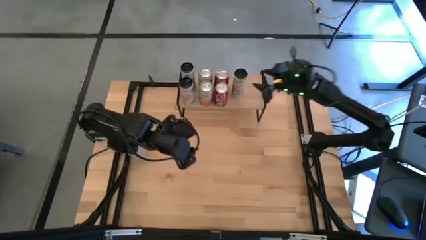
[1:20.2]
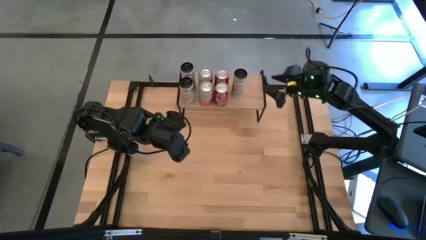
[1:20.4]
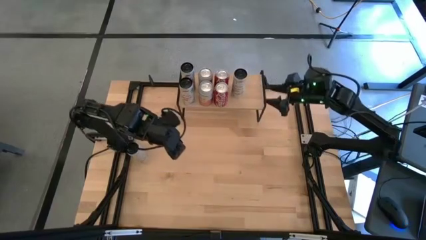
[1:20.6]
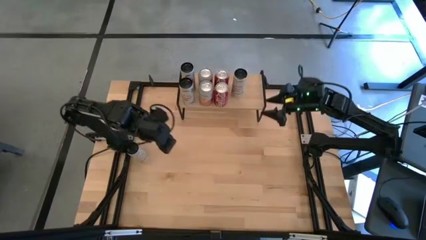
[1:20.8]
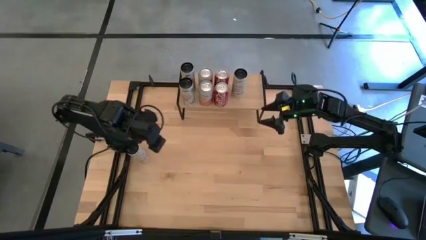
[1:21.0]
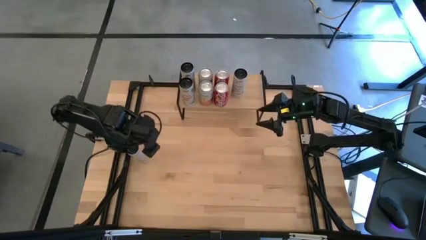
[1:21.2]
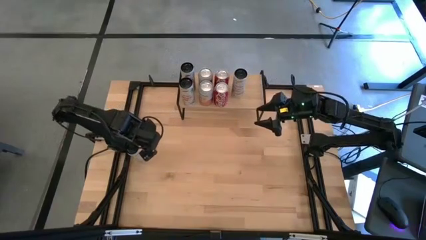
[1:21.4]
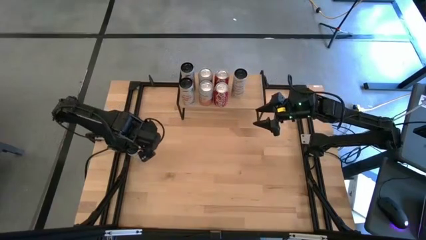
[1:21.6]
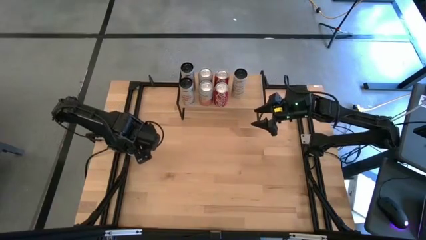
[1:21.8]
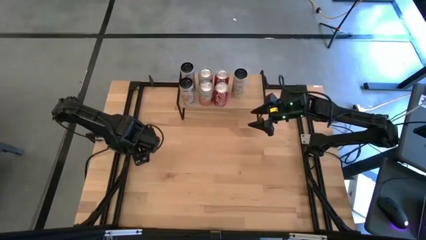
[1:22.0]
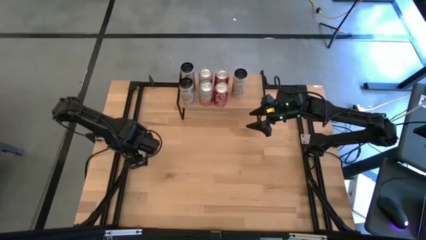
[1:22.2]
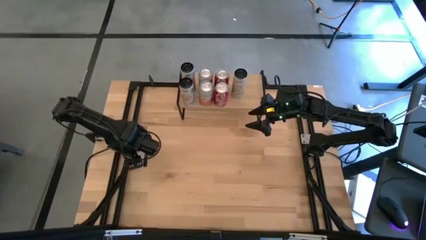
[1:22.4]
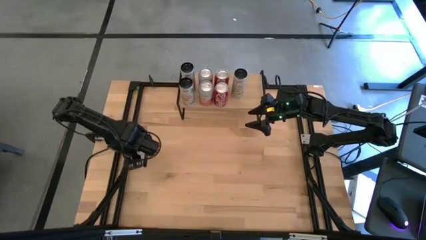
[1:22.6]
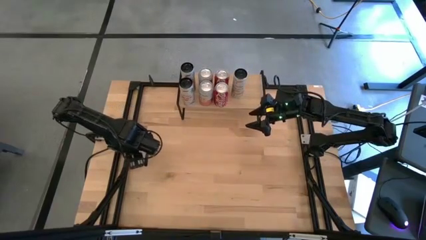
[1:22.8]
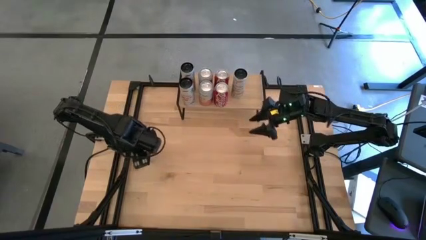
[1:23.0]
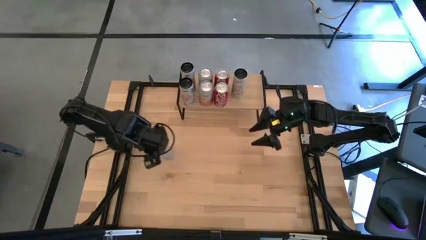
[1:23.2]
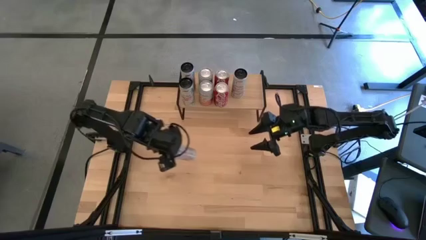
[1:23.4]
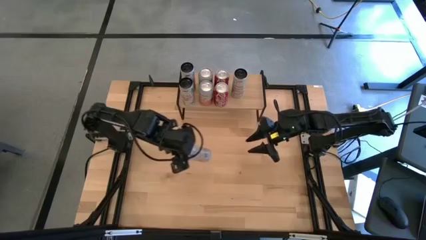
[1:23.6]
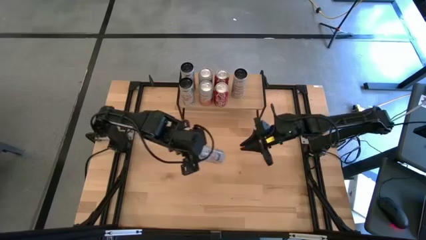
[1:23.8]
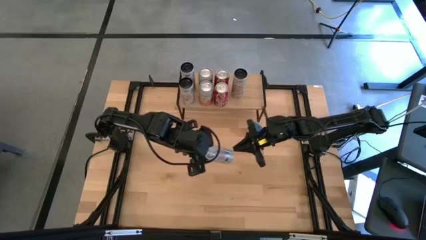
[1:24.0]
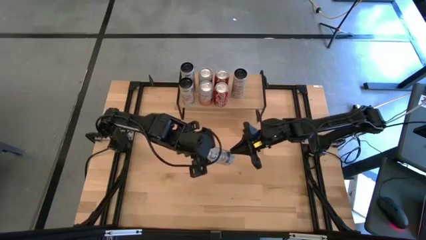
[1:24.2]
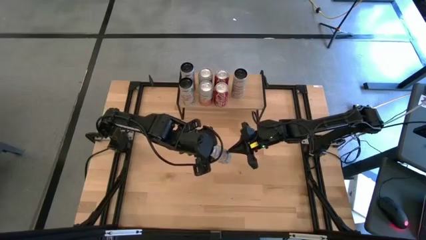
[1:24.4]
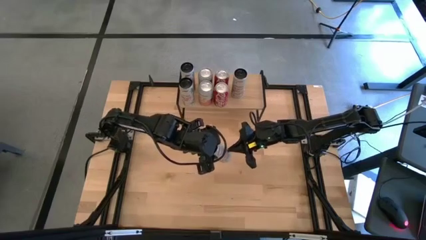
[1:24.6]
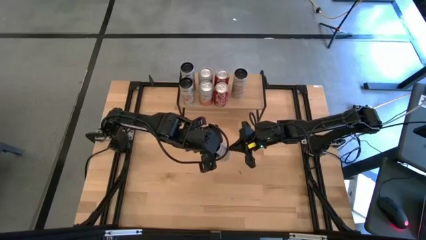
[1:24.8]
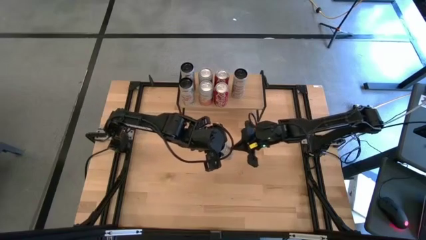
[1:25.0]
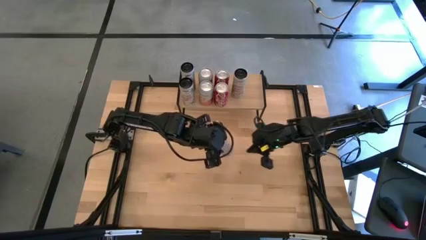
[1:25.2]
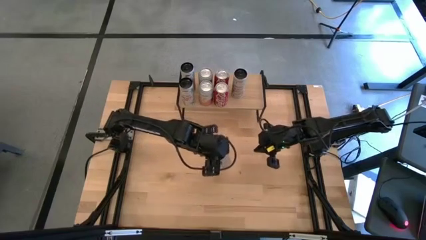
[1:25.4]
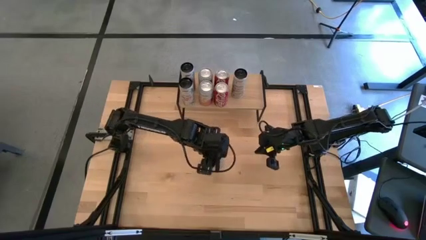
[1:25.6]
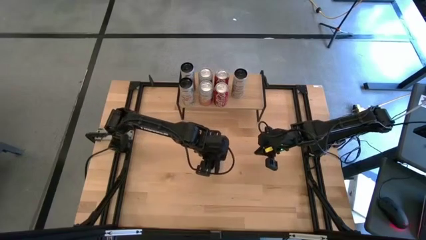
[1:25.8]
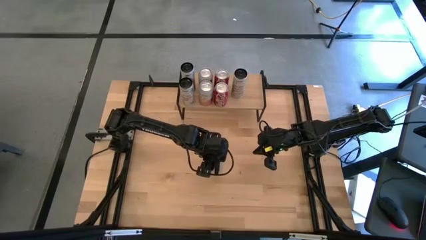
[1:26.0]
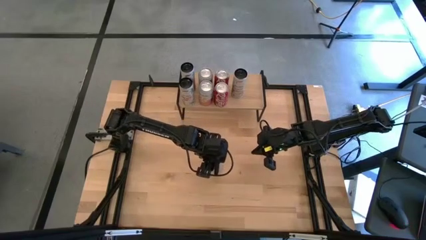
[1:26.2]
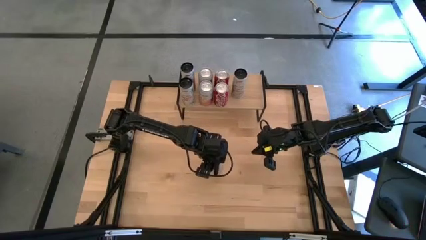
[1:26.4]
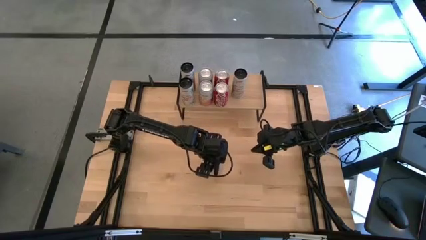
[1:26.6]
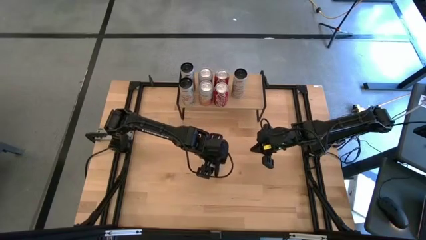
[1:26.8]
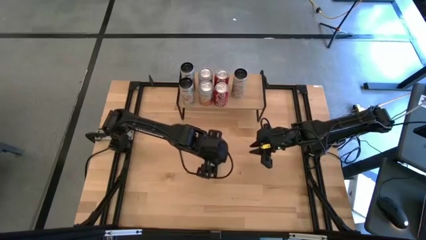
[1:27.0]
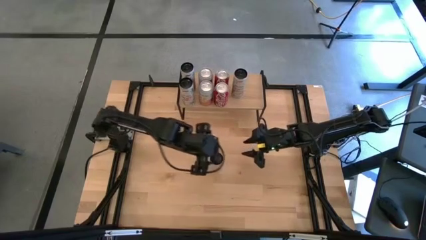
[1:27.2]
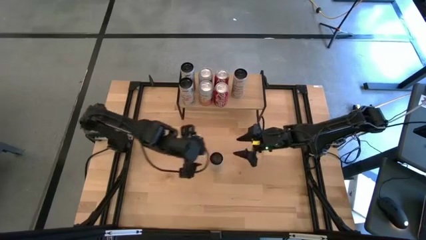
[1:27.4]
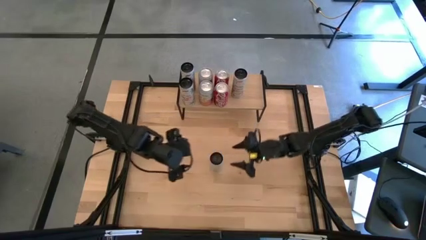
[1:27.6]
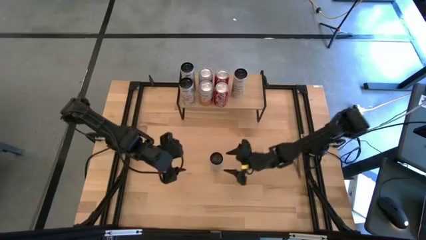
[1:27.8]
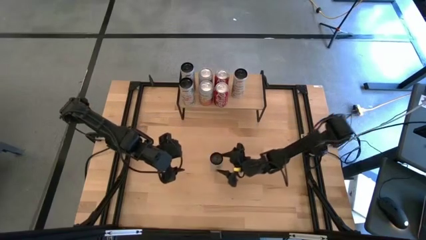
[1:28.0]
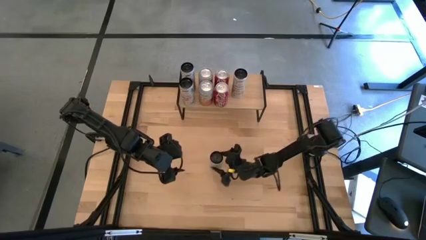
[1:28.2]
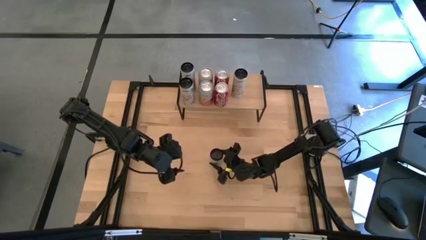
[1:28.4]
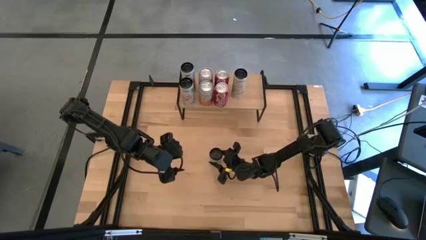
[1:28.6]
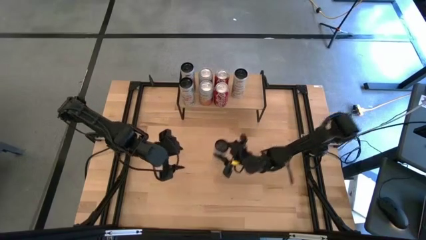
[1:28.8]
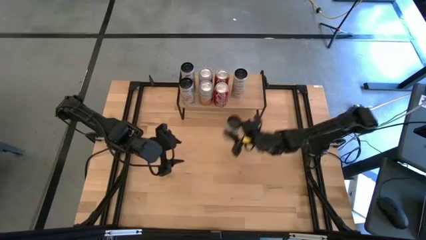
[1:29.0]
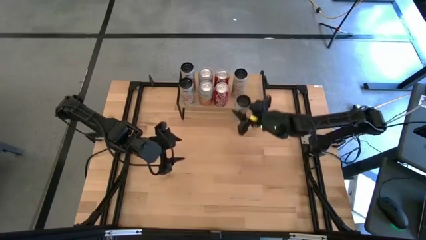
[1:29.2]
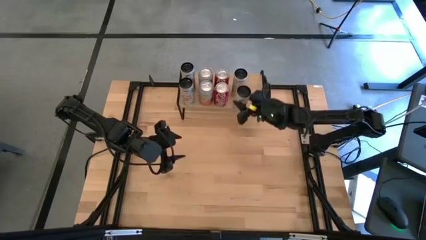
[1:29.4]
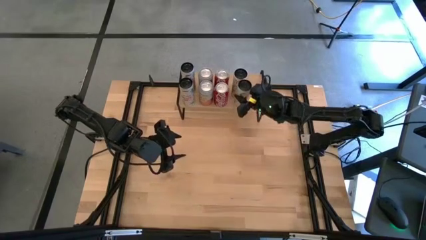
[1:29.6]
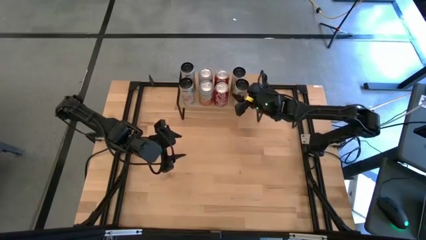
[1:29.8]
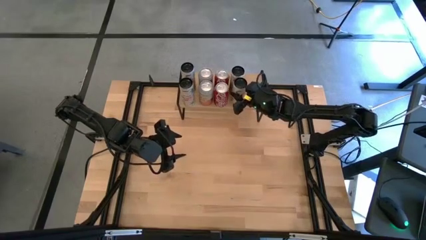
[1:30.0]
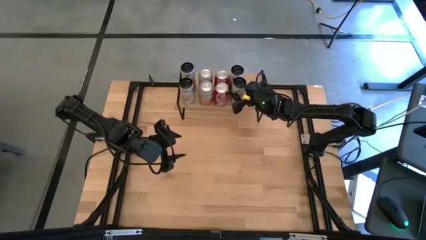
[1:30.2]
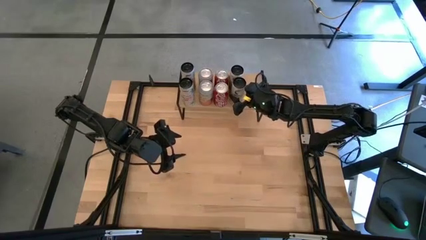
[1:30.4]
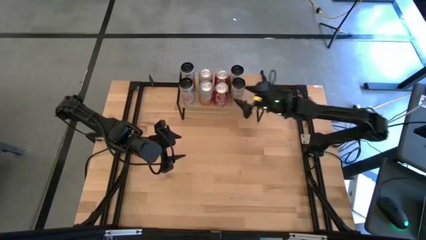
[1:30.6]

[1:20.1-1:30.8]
Task: Place canned beverage on shelf
Put the white soda can aligned with the other white soda can on the shelf

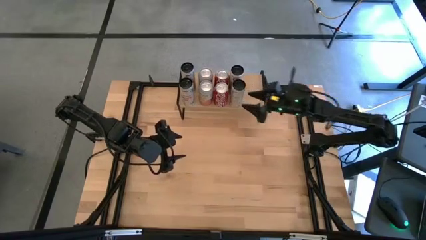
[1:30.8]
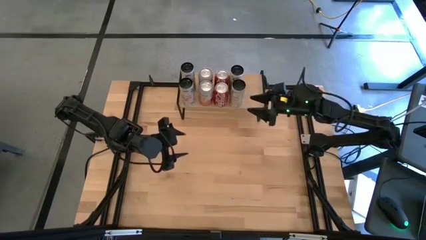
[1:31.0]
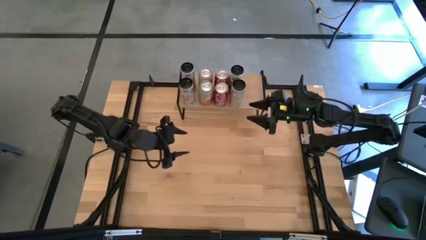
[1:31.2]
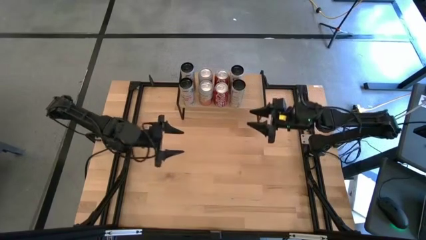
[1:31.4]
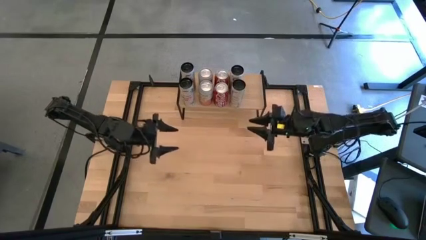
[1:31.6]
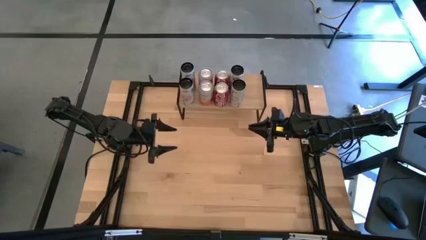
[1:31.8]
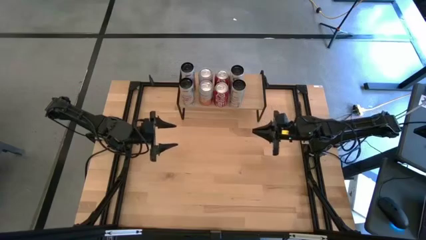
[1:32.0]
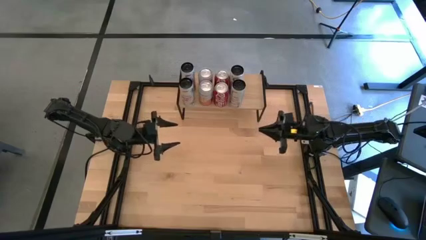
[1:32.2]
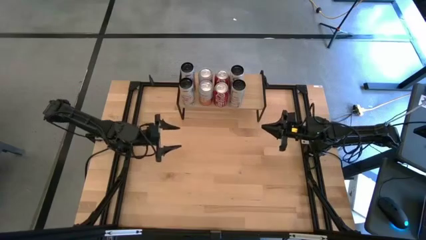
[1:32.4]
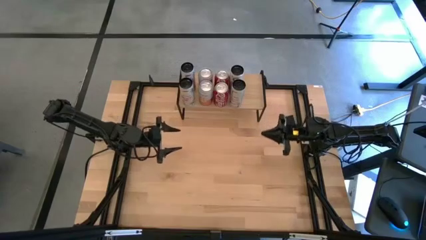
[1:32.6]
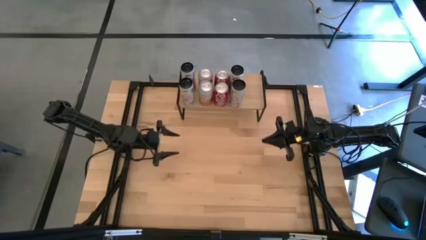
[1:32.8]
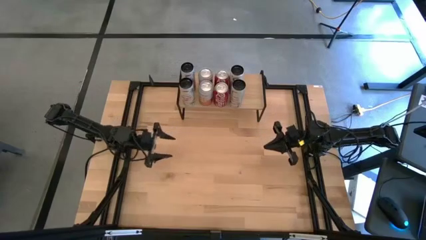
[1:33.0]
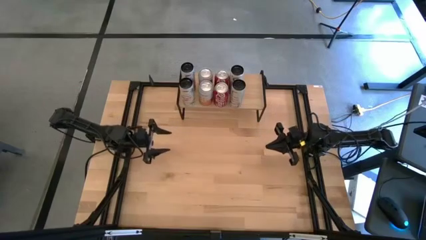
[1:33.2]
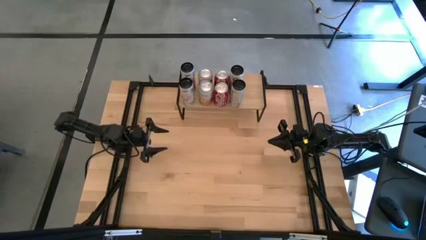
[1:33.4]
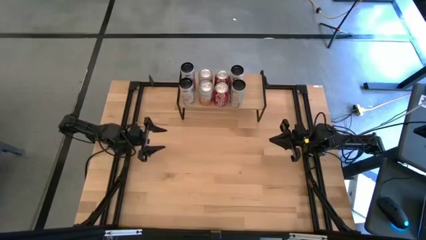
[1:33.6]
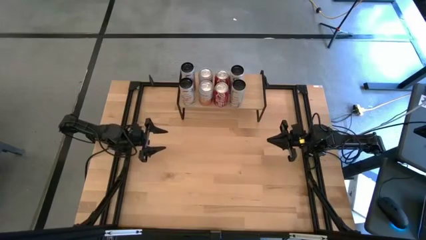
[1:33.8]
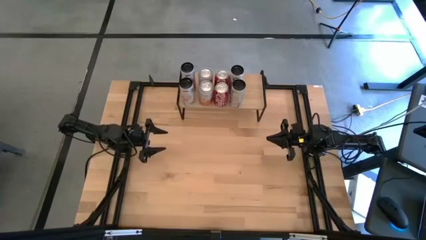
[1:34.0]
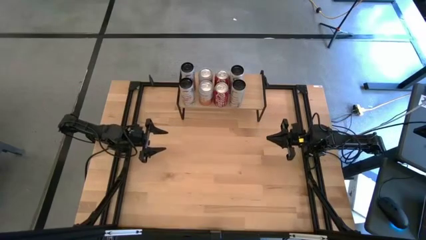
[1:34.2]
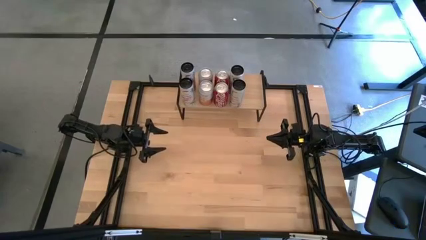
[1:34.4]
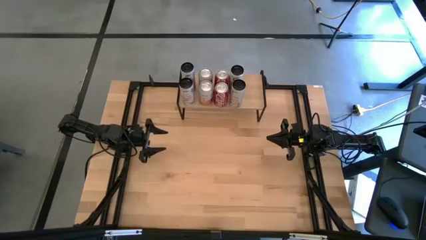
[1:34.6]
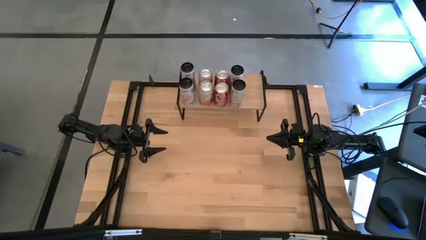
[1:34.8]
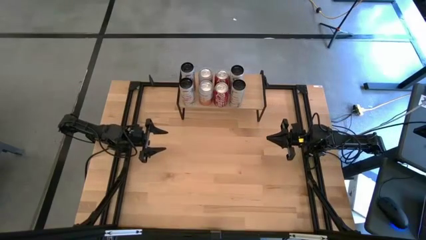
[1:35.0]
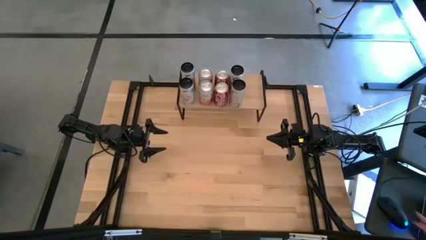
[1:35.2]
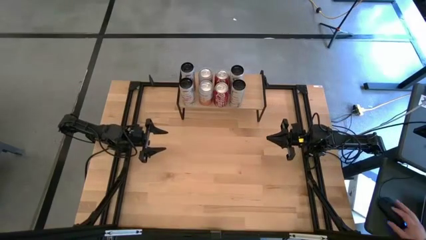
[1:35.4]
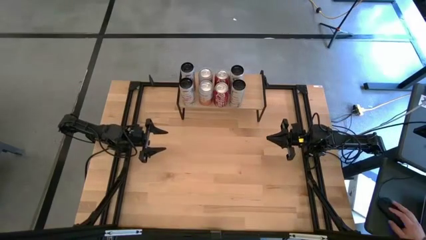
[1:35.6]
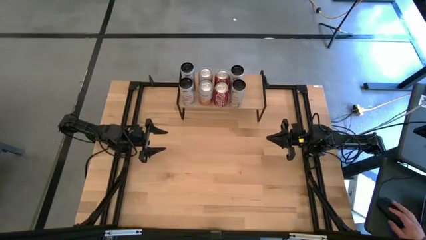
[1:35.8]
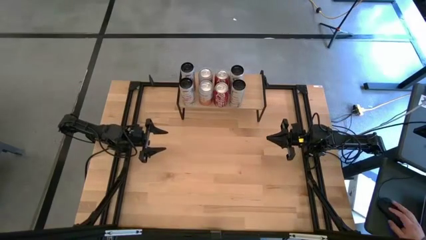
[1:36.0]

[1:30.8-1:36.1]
Return to Home Position
